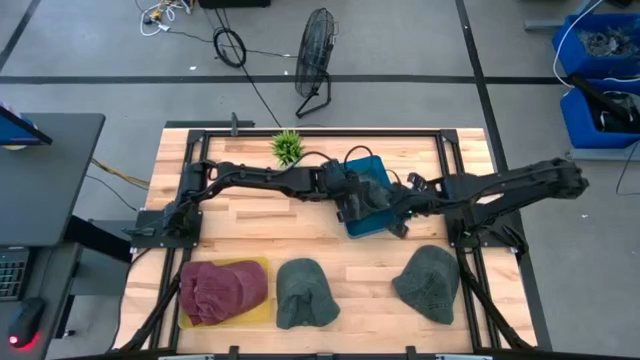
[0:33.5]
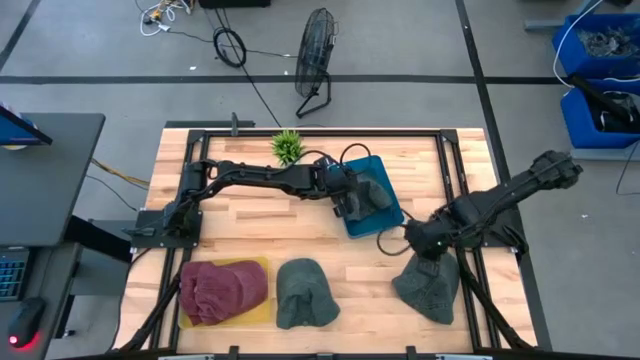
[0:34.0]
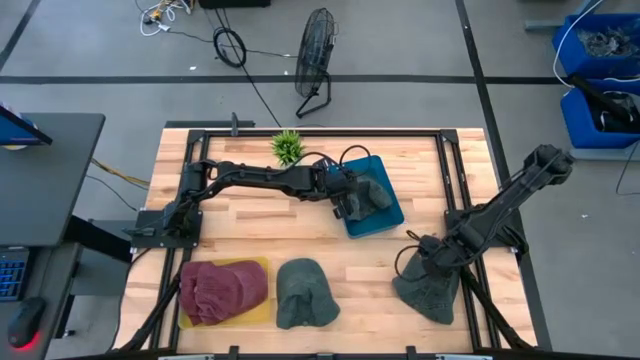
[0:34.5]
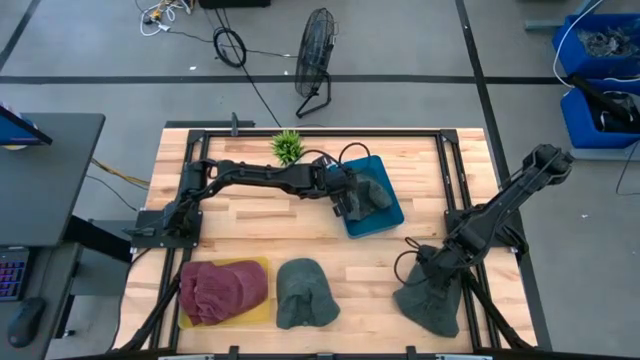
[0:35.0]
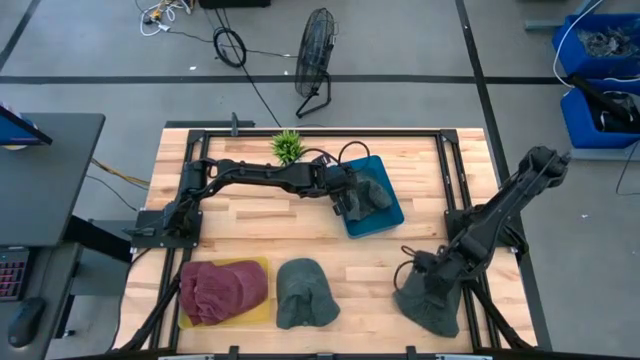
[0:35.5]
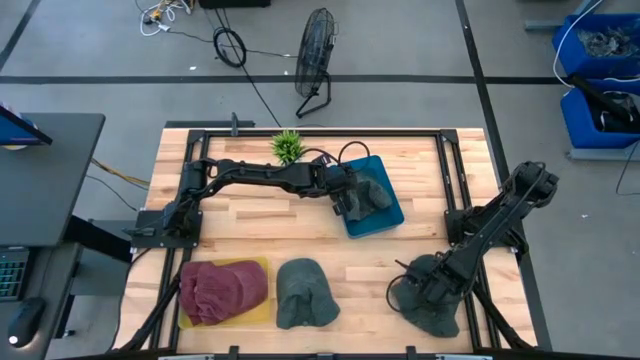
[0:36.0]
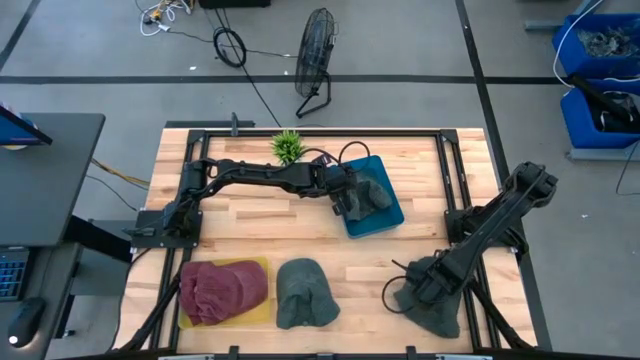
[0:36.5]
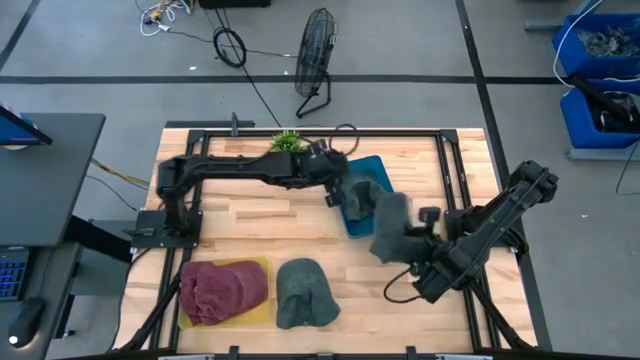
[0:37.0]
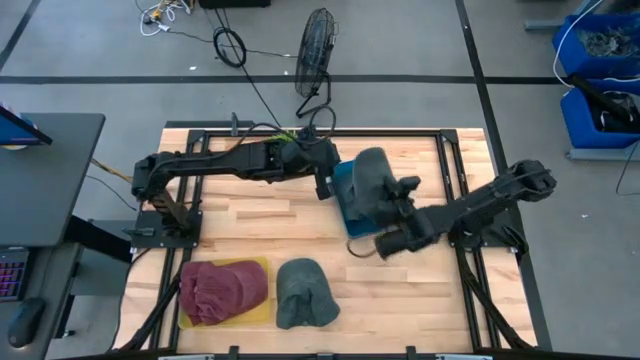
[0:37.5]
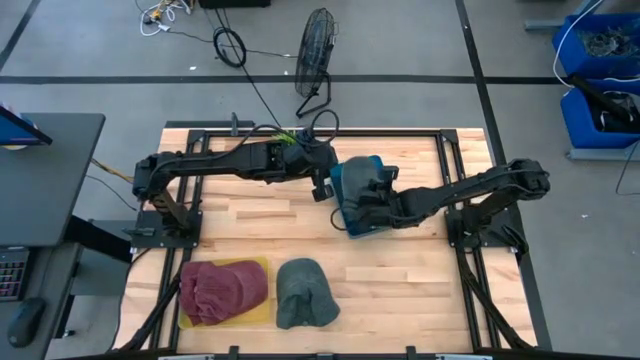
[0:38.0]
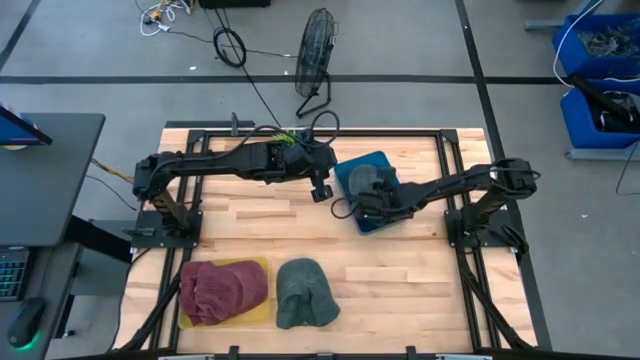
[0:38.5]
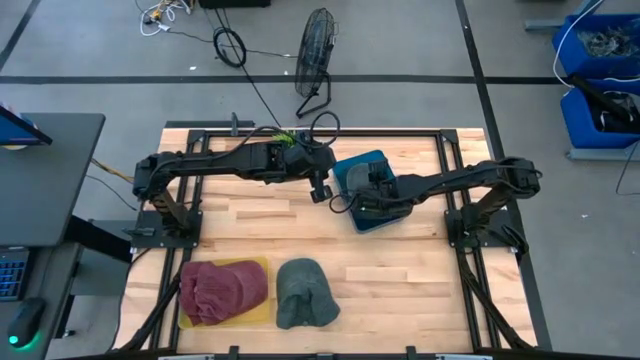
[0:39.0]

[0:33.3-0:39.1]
Task: Pick & Place hat
Put the right black cap into the blue bin

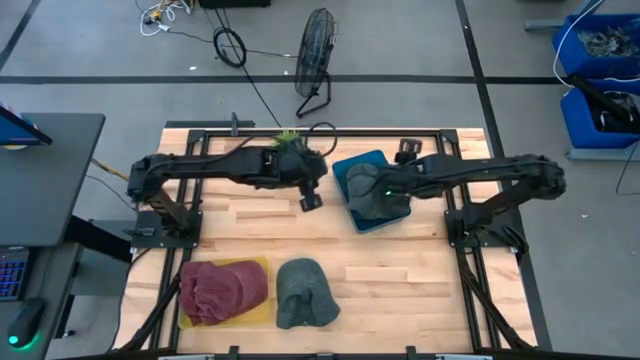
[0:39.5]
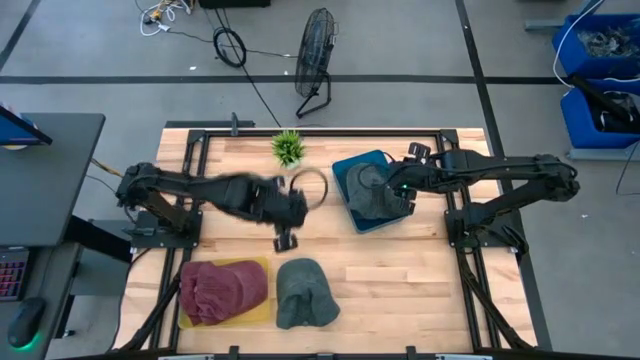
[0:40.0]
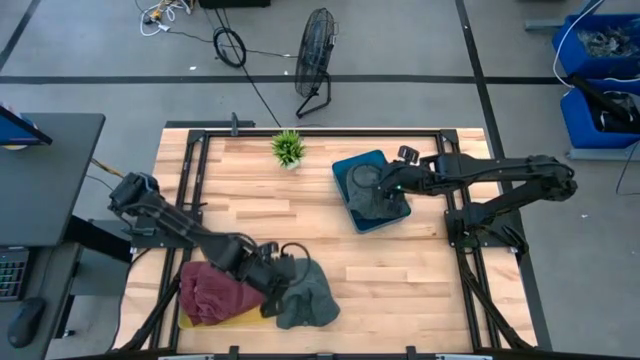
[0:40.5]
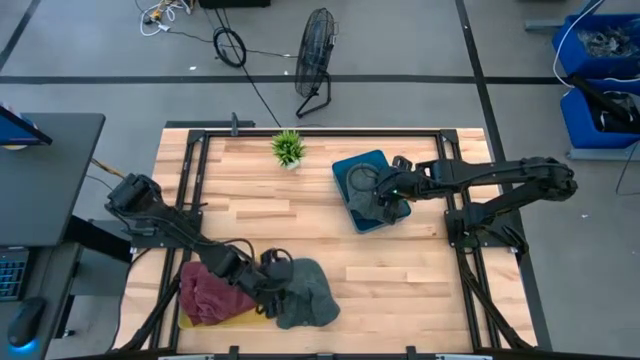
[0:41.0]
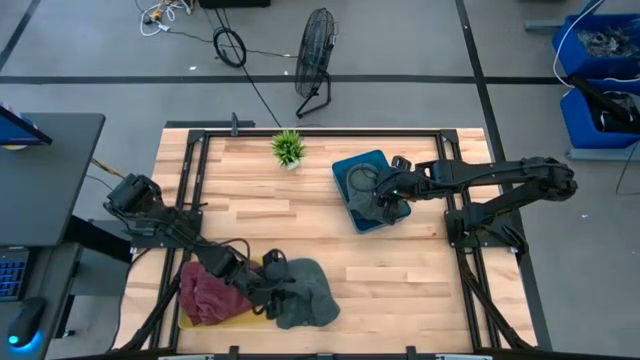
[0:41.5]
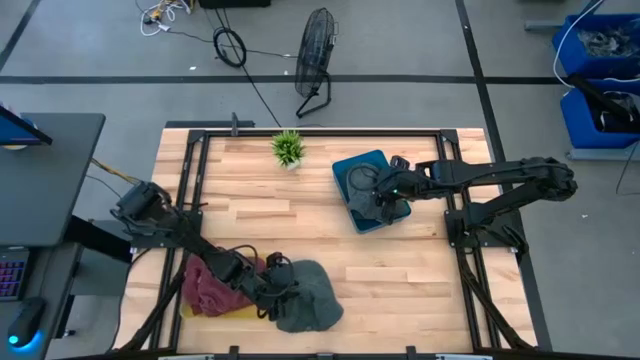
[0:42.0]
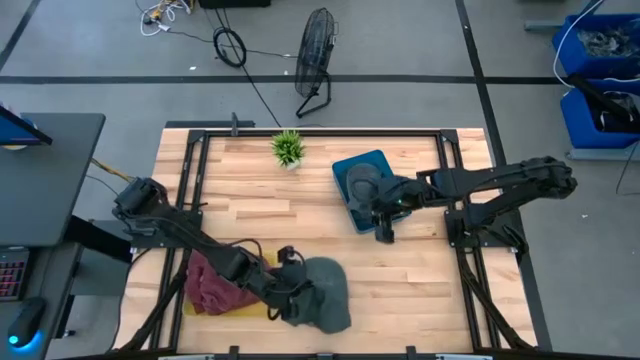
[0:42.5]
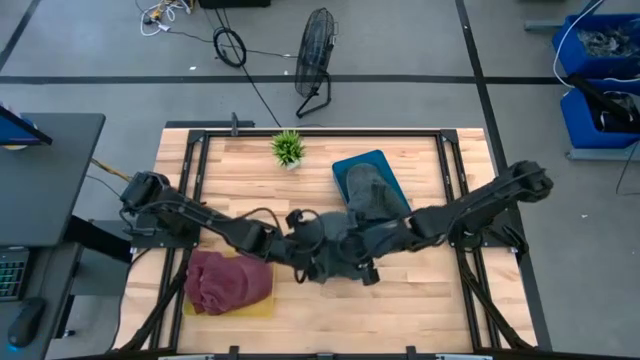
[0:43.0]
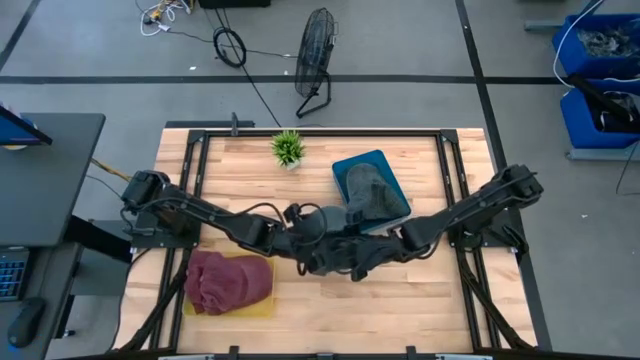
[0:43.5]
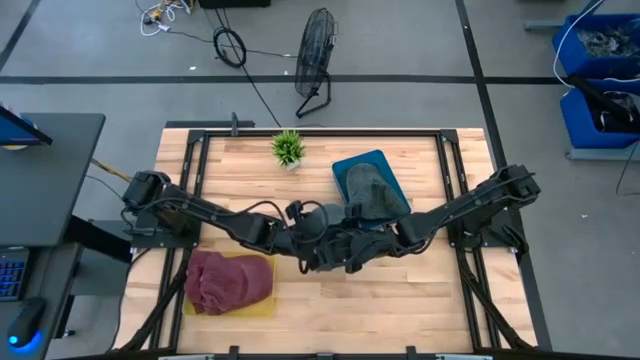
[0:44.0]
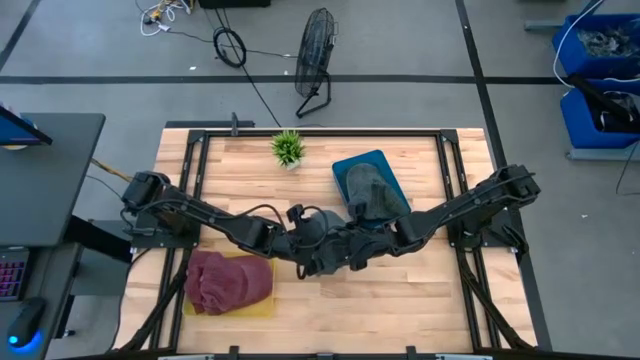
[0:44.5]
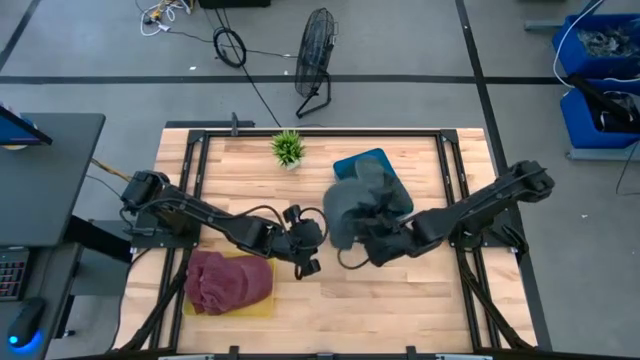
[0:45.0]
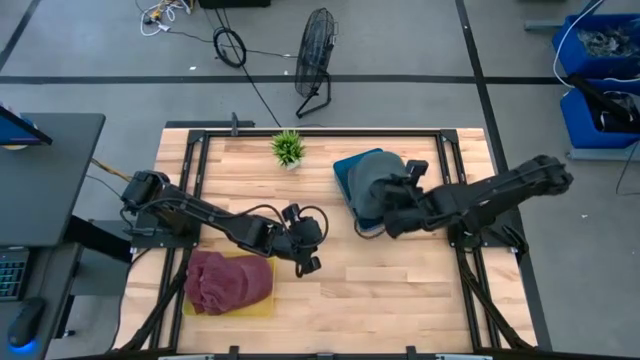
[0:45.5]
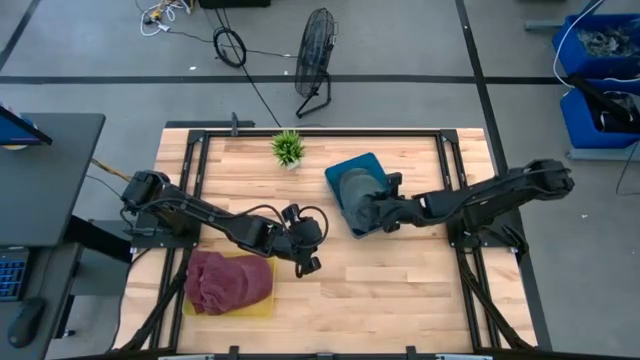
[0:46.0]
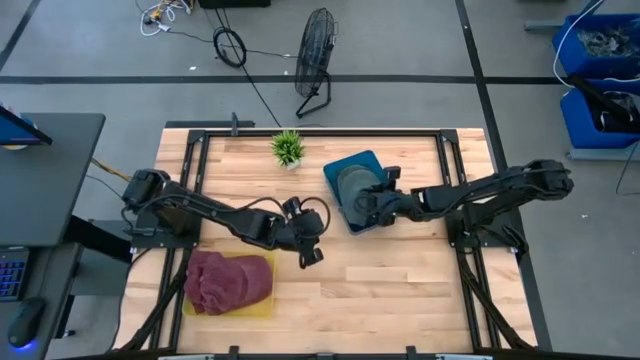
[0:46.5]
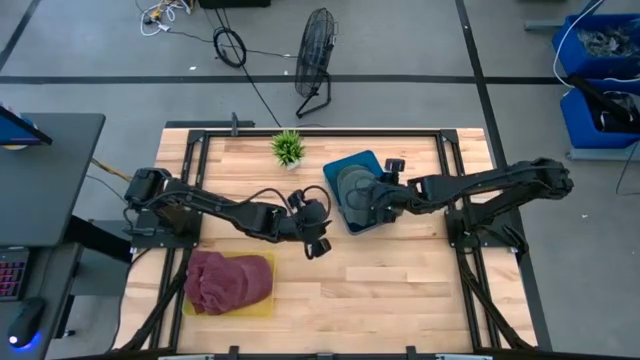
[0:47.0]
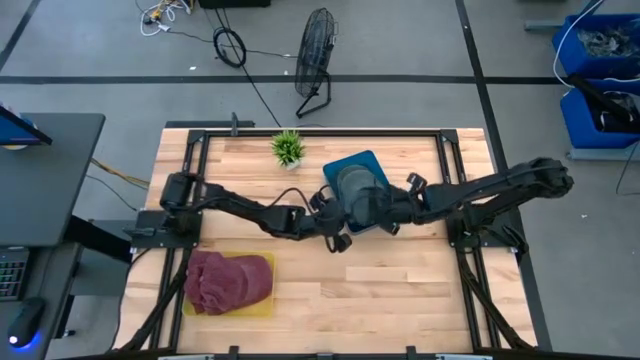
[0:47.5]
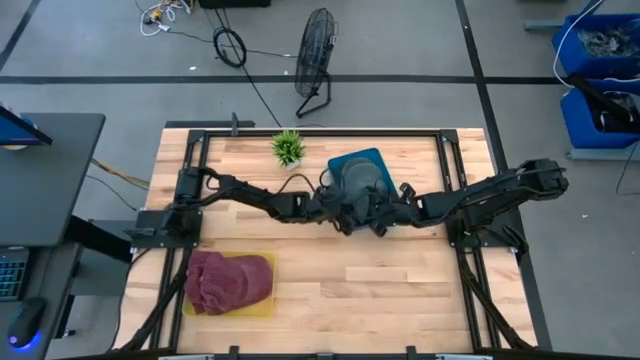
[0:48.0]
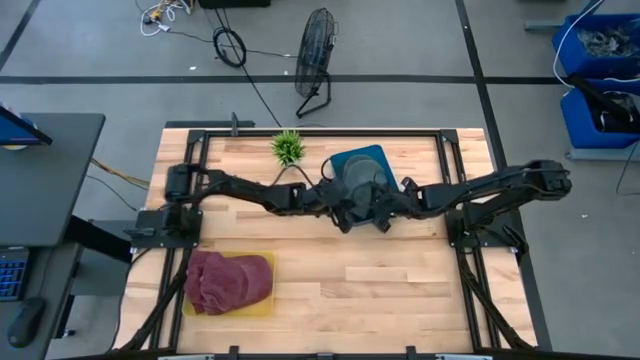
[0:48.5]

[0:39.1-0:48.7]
Put the black cap into the blue bin

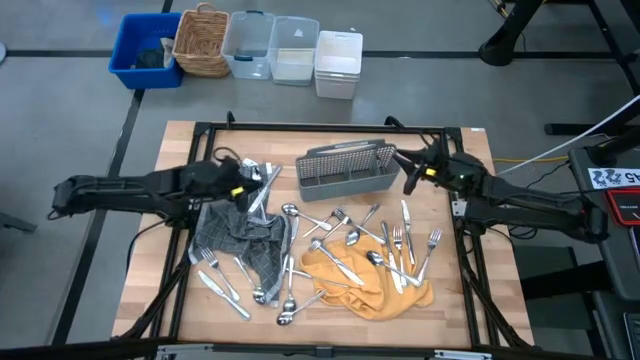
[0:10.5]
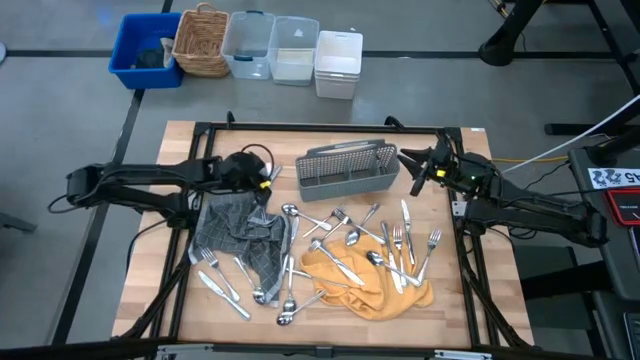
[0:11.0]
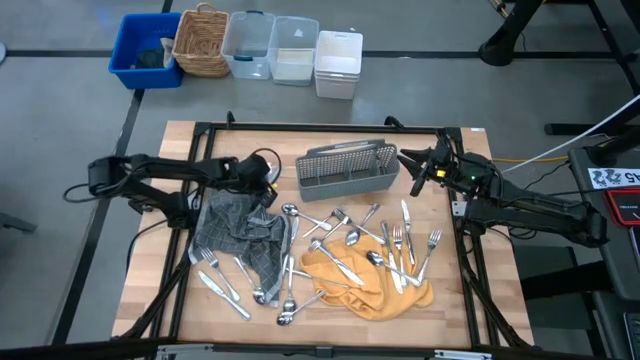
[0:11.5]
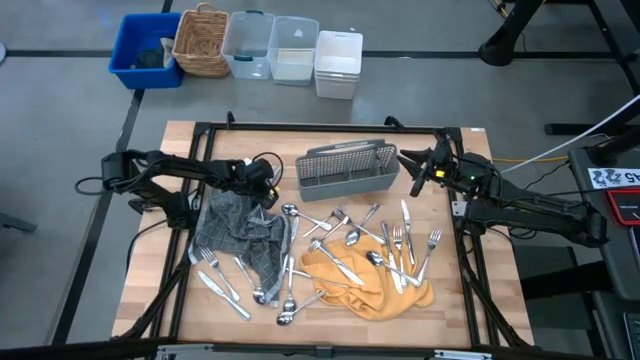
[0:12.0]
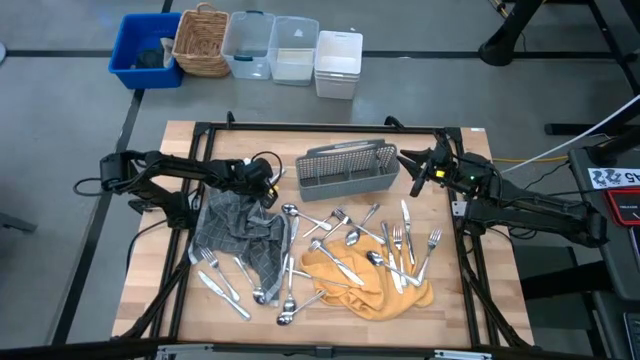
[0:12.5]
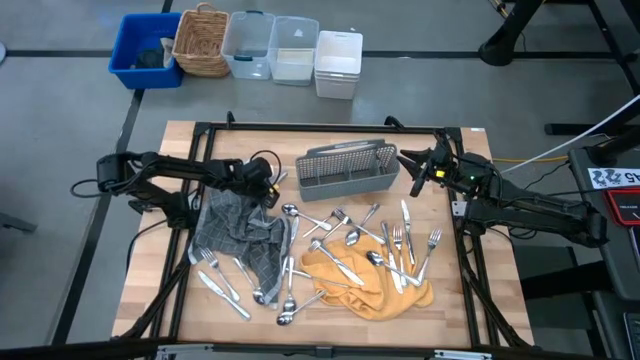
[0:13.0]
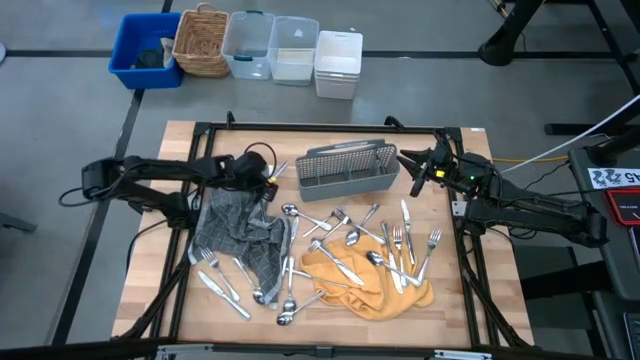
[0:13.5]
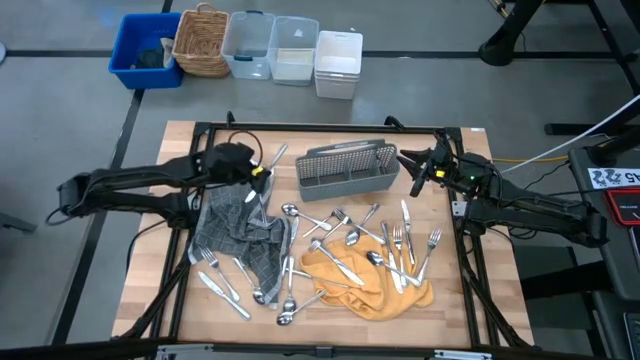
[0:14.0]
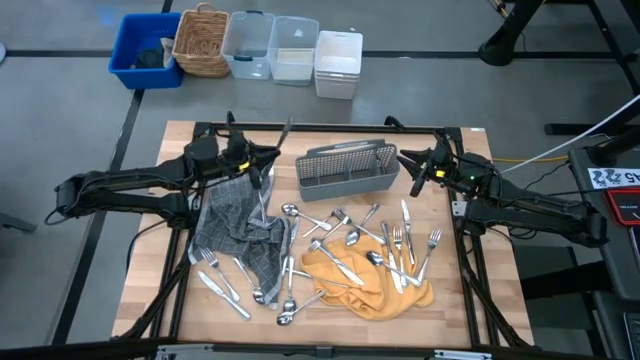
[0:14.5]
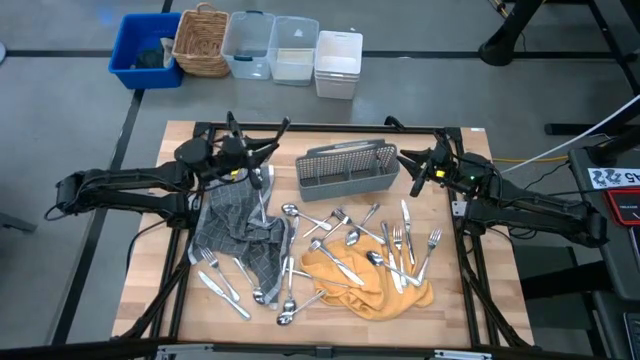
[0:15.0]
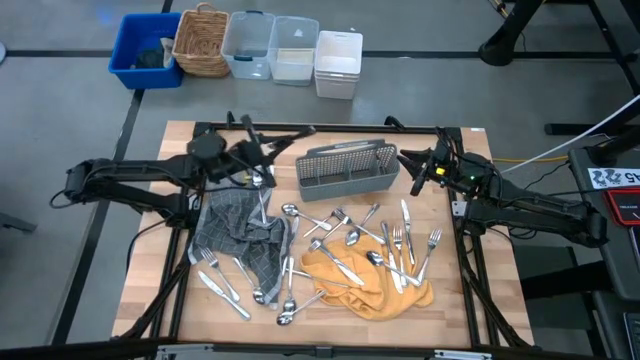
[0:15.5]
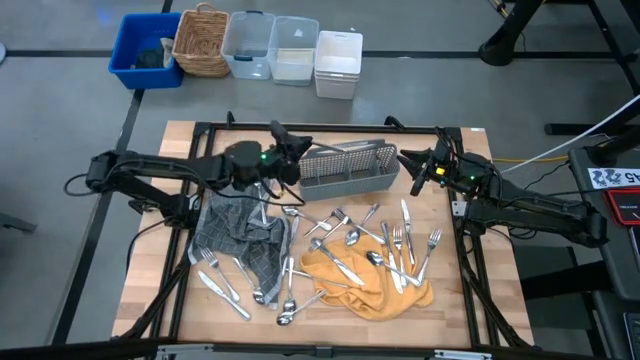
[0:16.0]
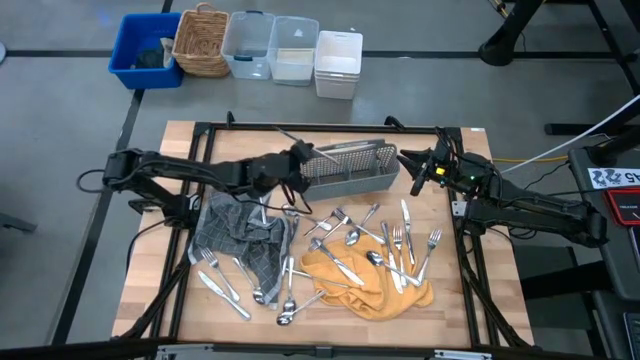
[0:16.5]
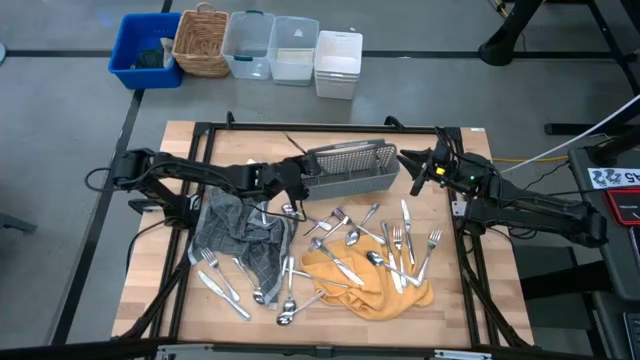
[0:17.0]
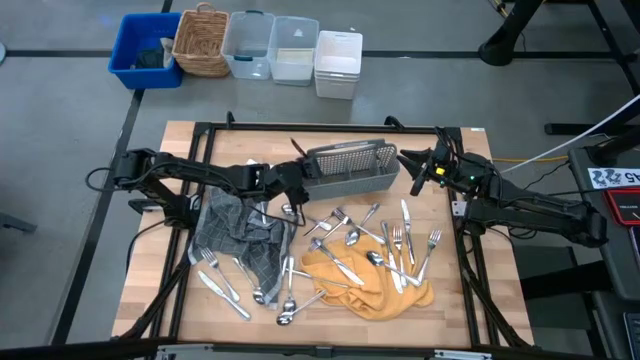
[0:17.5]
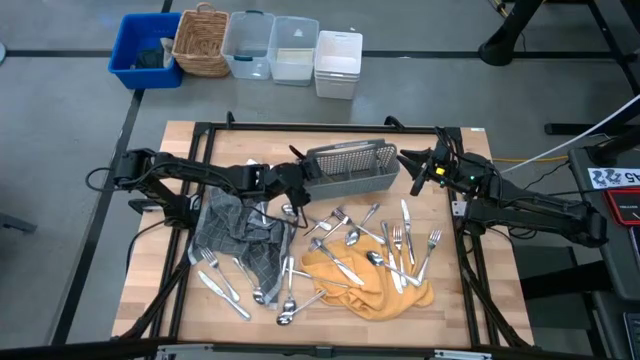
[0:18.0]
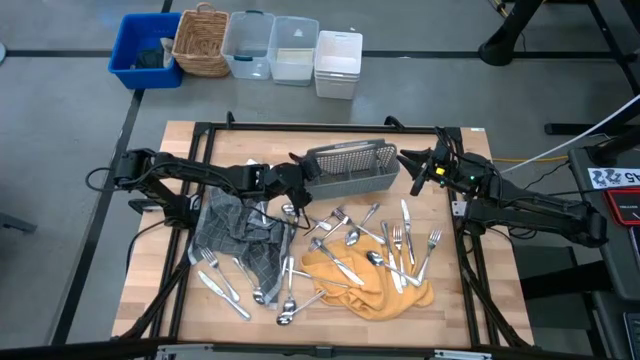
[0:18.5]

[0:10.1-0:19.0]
Task: Sort silverware
Put the silver knife into the gray utensil holder
